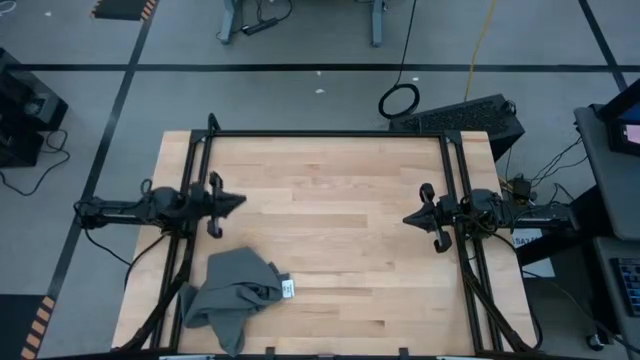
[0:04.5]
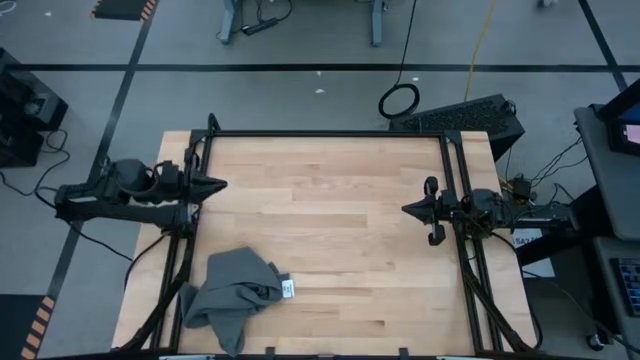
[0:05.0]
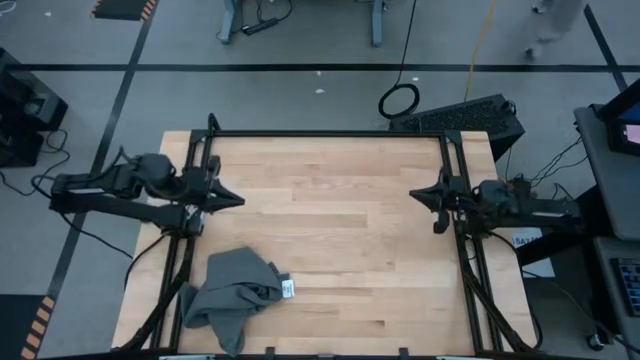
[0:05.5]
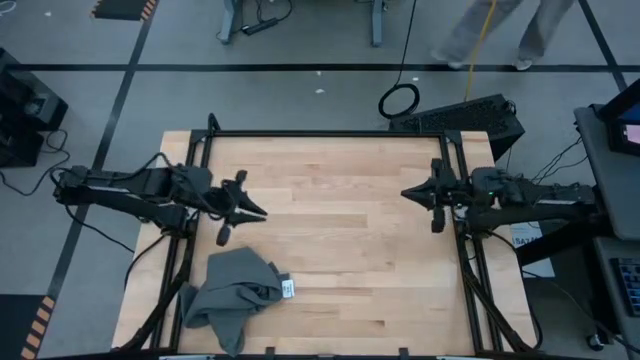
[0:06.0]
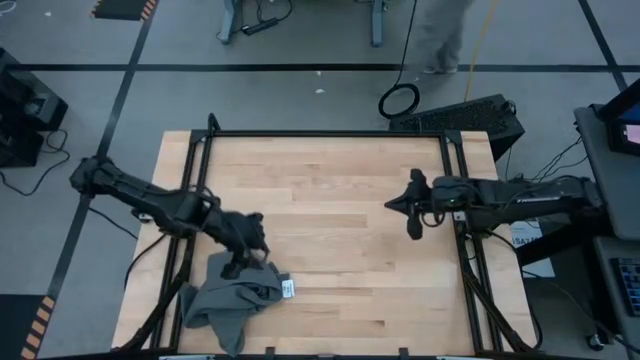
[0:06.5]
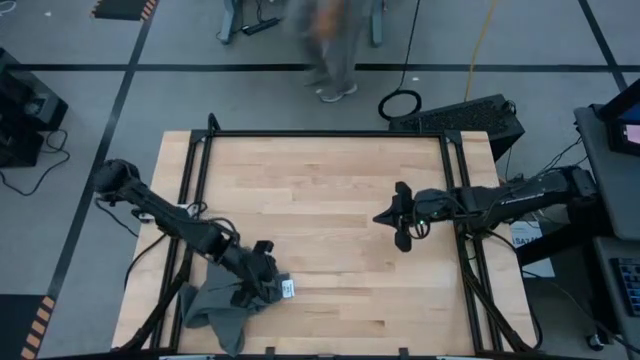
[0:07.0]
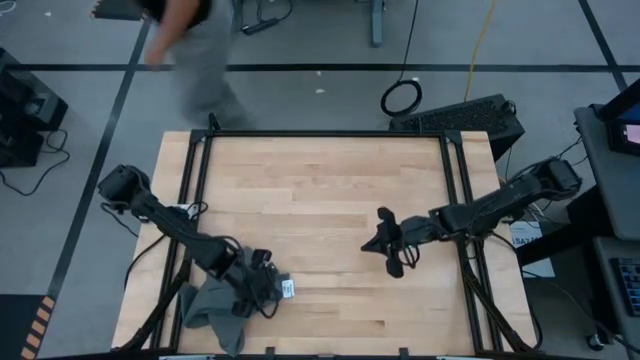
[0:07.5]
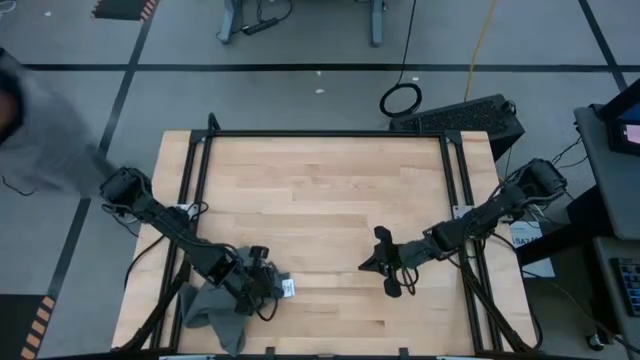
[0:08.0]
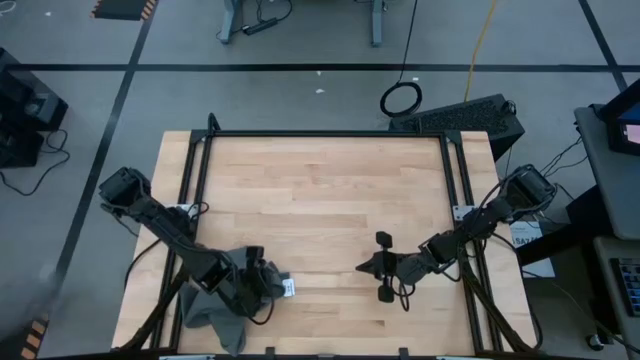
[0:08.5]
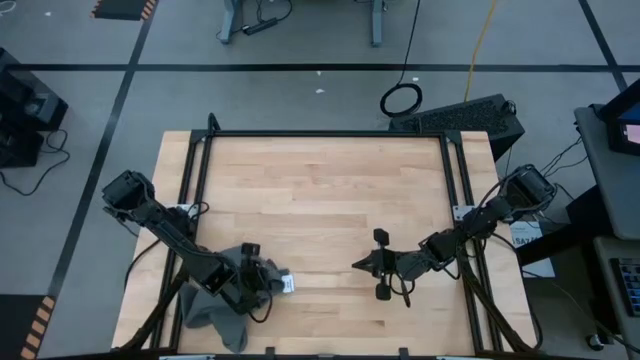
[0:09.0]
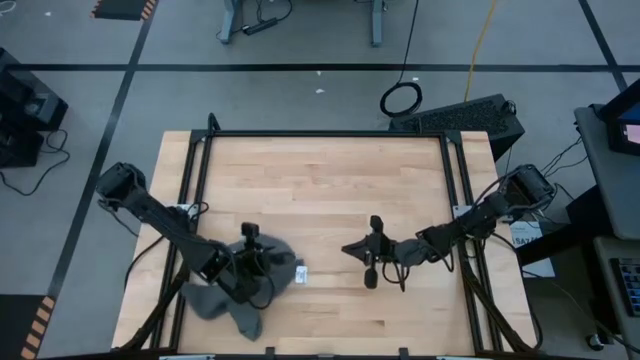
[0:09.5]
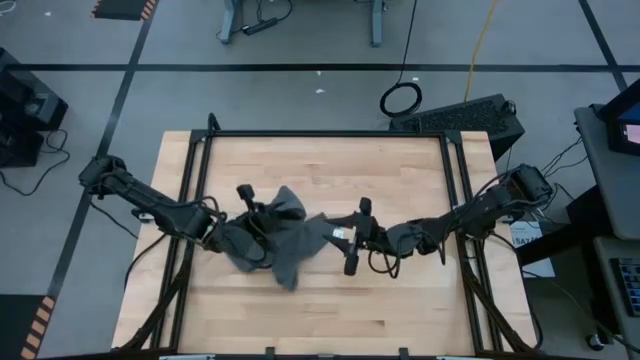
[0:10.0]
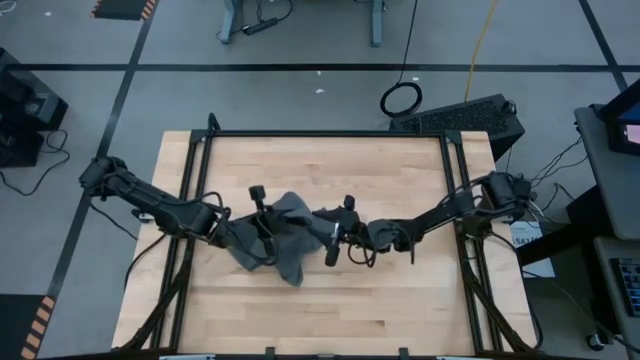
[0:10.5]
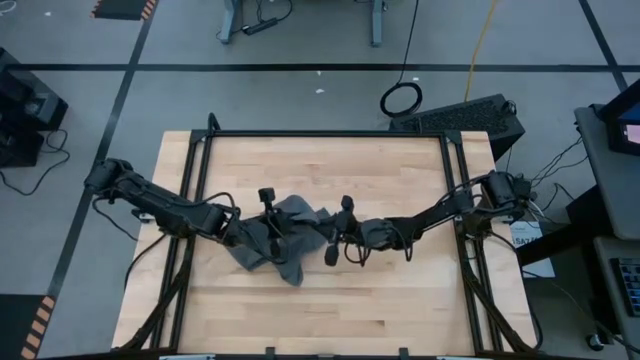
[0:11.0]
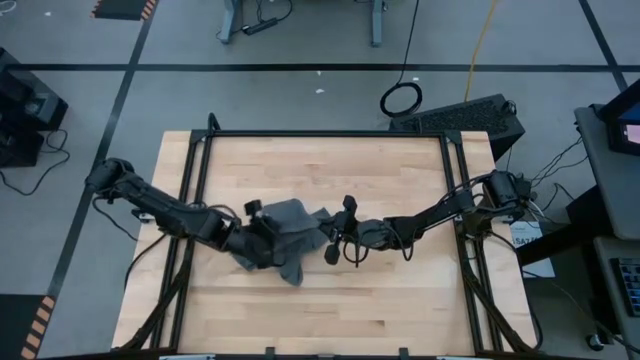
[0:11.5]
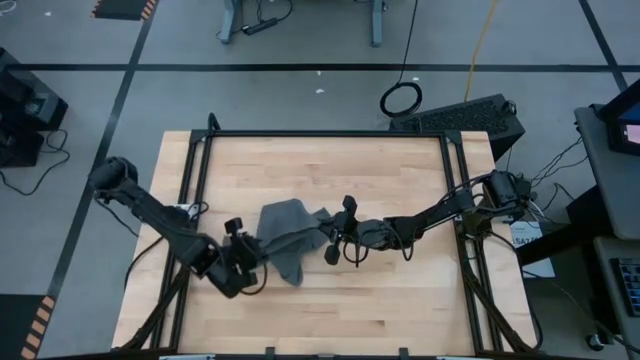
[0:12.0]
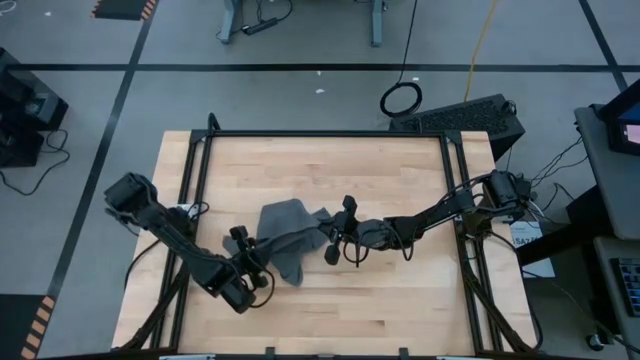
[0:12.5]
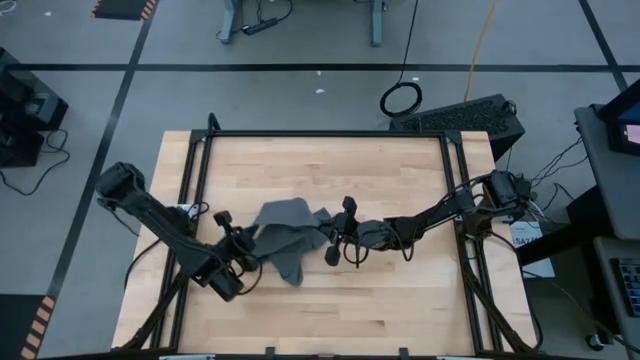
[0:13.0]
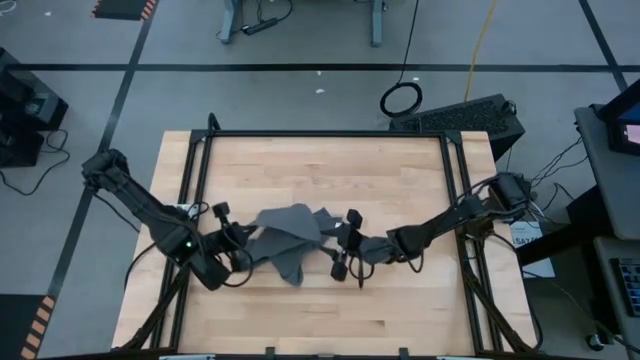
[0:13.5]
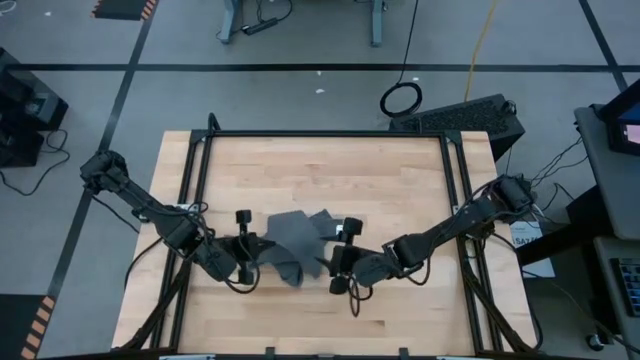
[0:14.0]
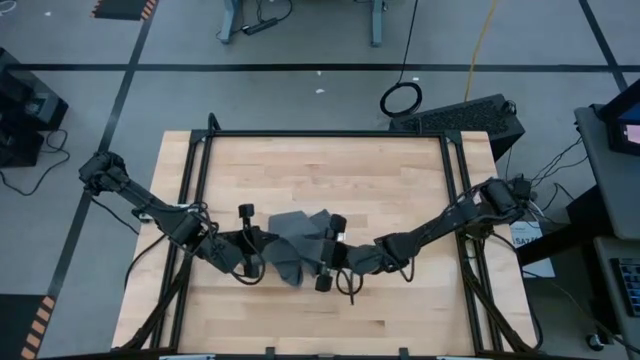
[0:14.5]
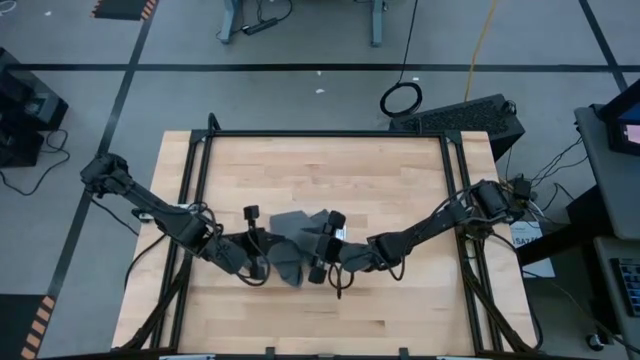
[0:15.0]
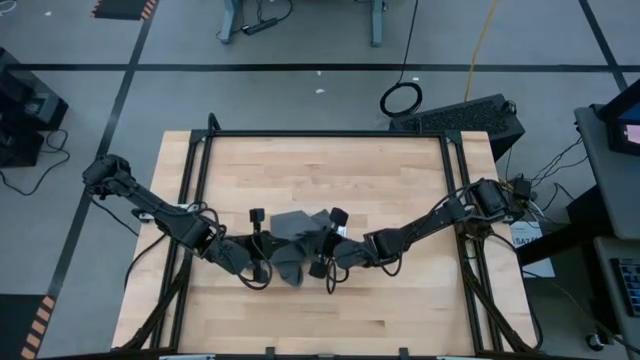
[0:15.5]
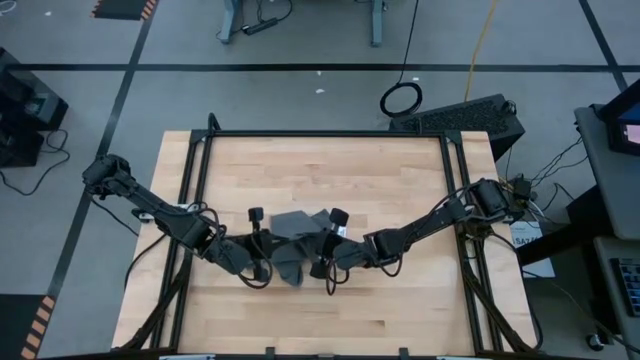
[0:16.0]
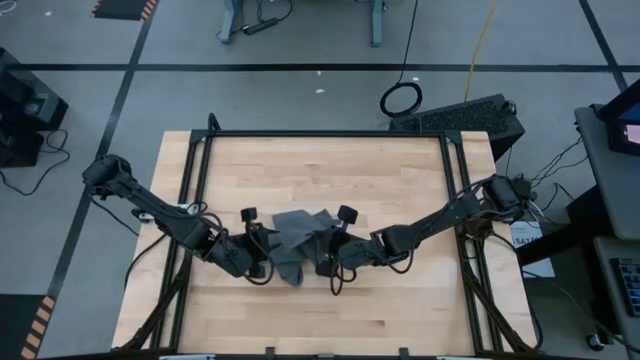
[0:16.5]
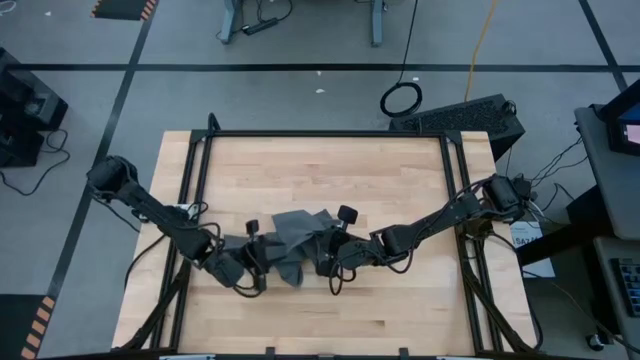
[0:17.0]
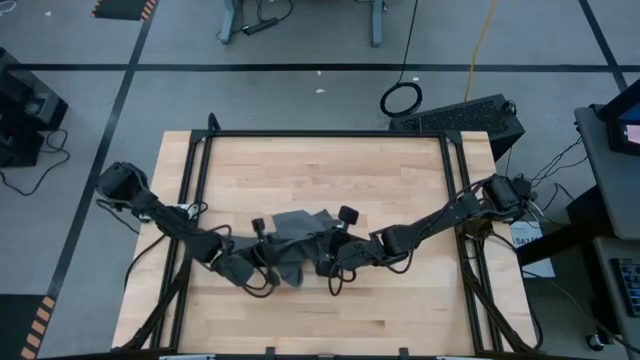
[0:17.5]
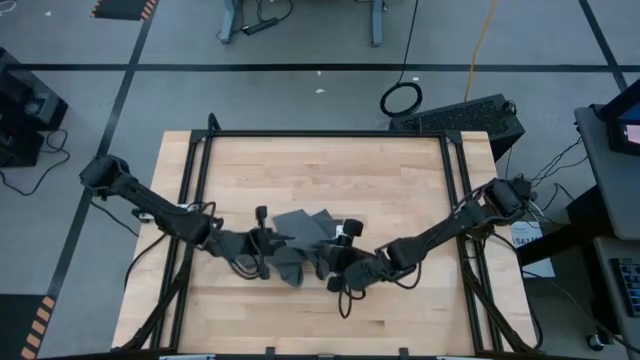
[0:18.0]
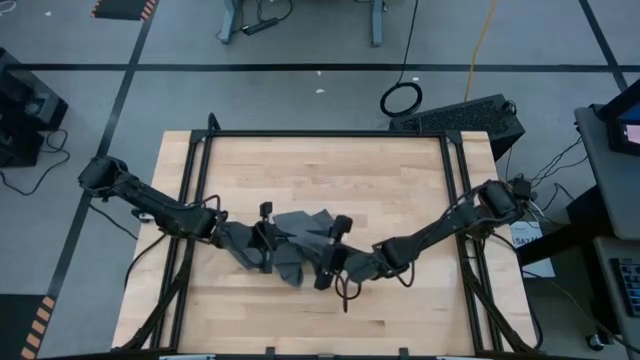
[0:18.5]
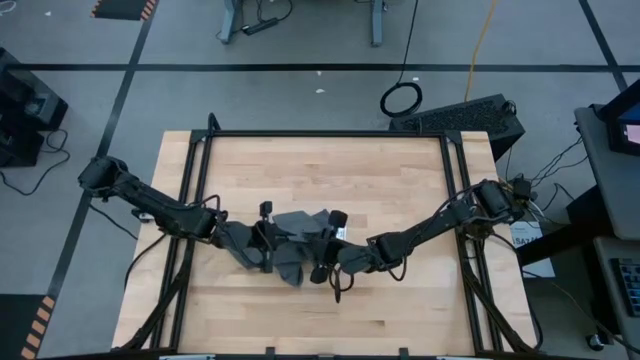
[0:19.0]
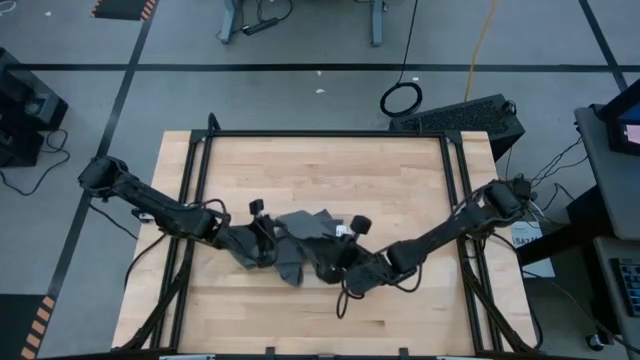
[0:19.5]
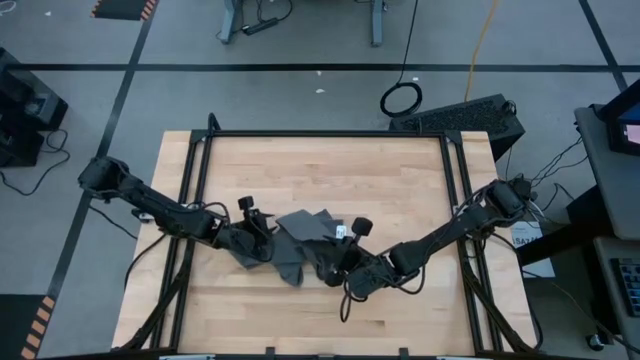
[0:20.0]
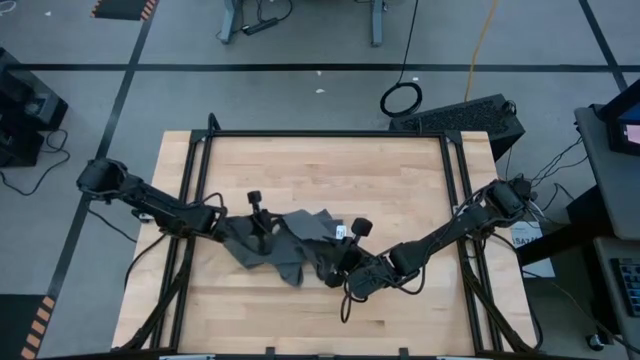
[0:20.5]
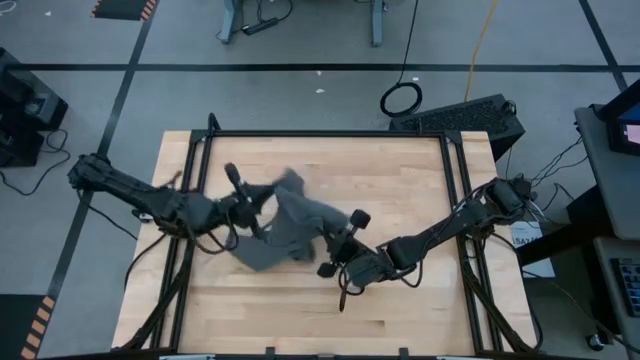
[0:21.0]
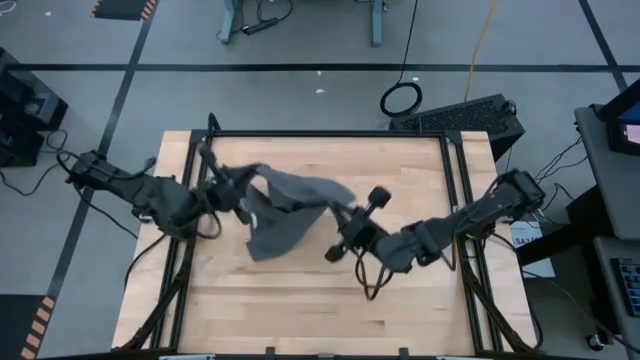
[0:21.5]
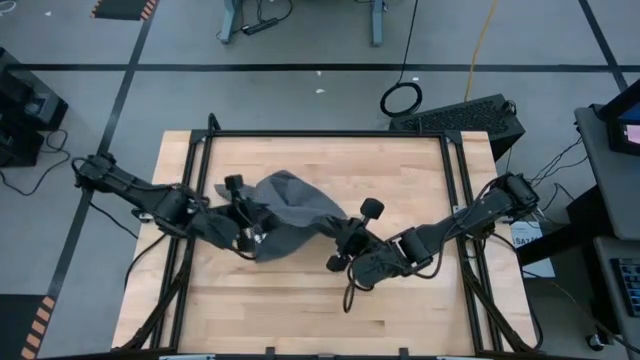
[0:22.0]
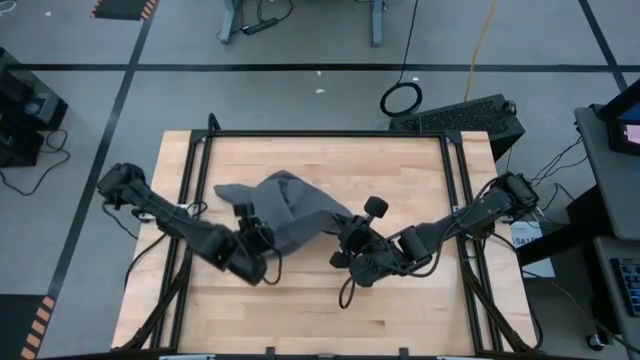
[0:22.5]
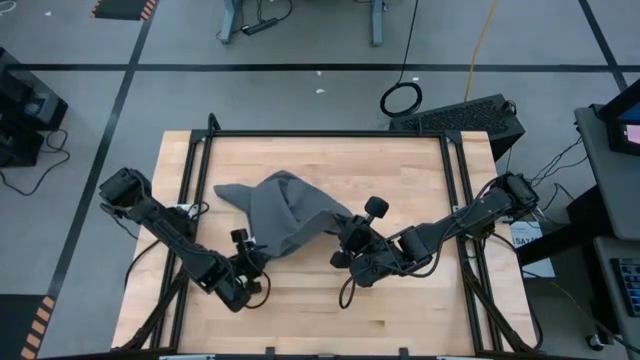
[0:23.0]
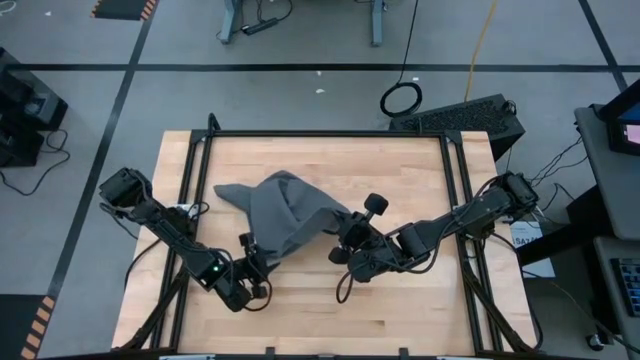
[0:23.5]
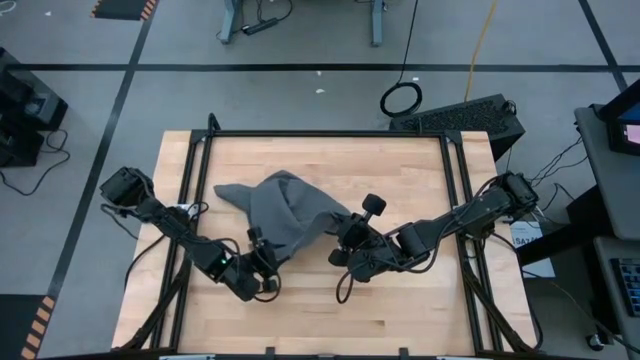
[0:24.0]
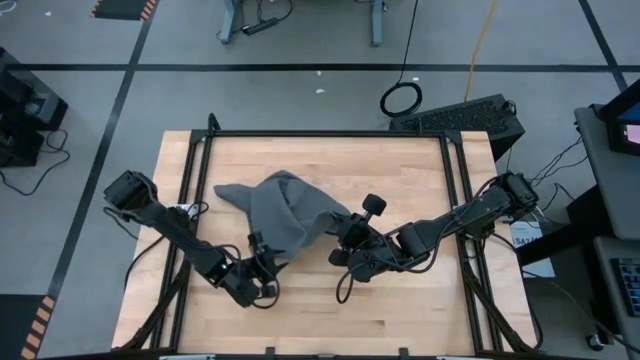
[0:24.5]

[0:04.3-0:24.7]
Task: Roll towel into tight, uniform cylinder
Roll the gray towel
